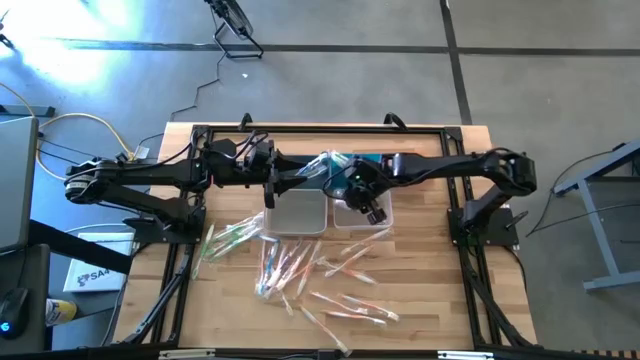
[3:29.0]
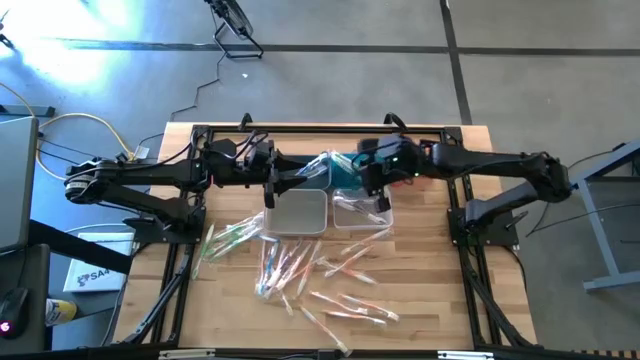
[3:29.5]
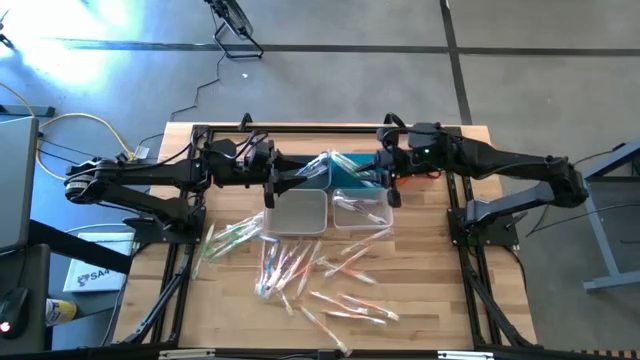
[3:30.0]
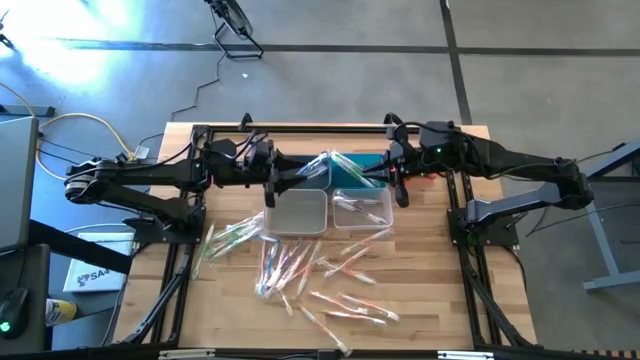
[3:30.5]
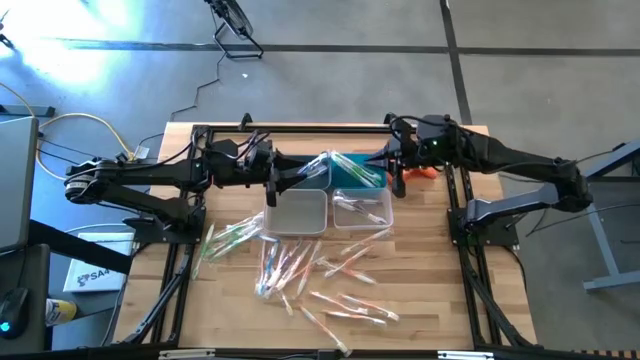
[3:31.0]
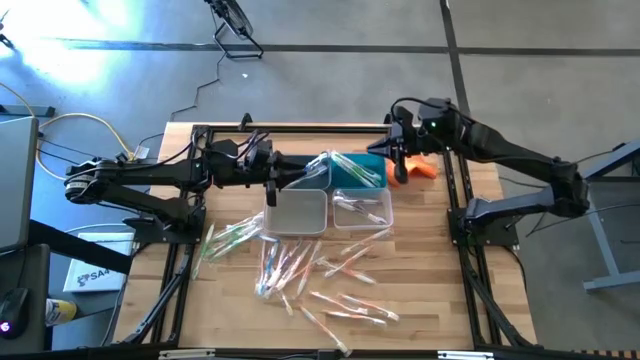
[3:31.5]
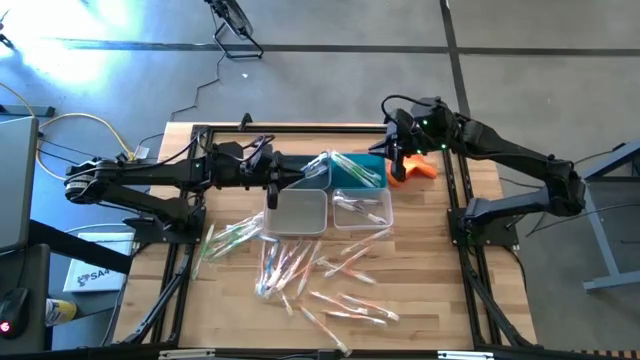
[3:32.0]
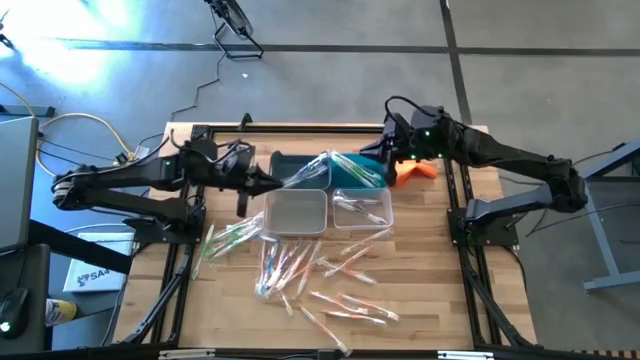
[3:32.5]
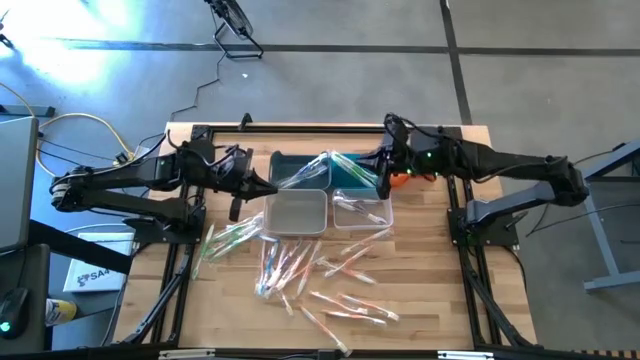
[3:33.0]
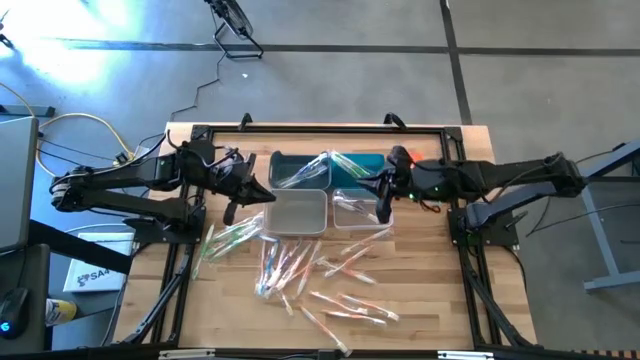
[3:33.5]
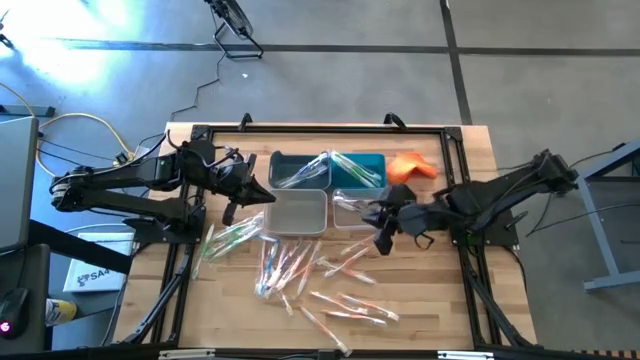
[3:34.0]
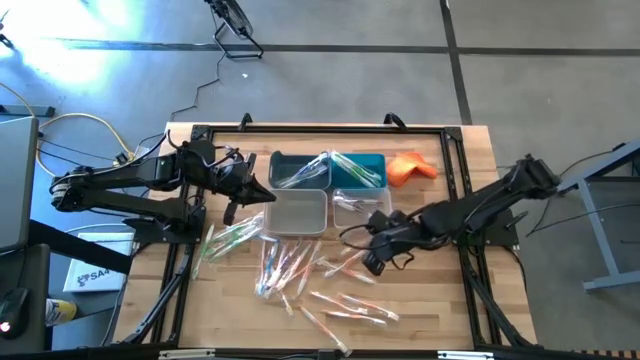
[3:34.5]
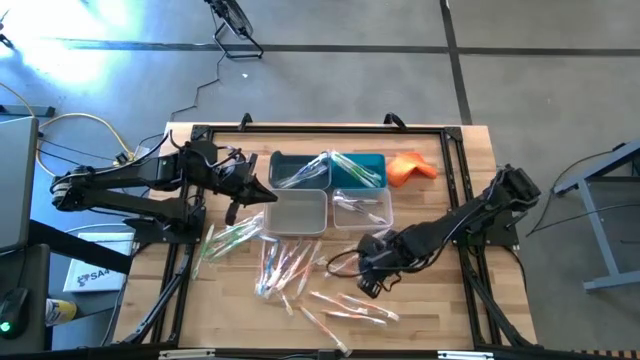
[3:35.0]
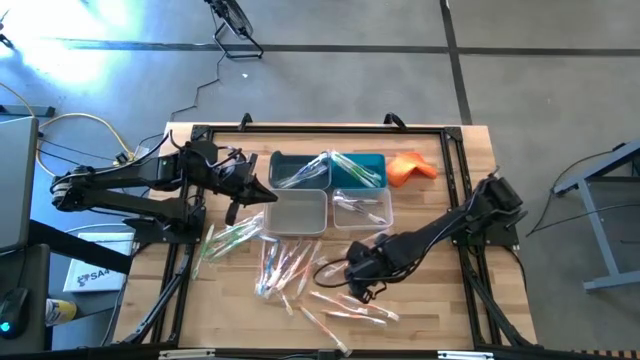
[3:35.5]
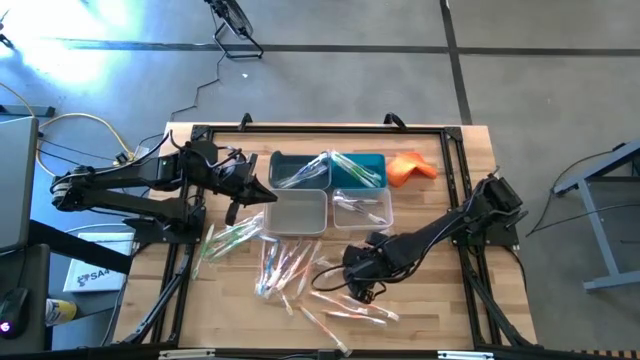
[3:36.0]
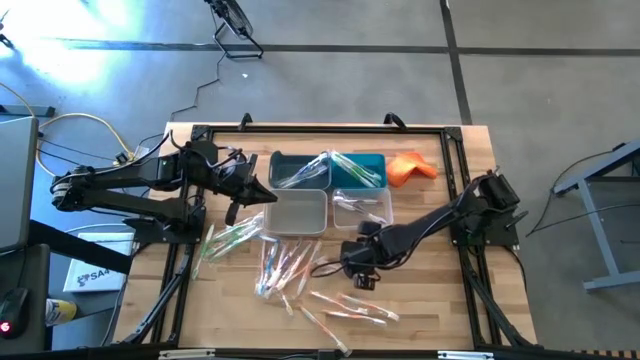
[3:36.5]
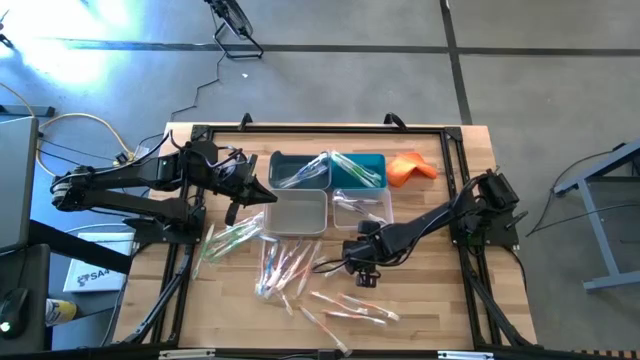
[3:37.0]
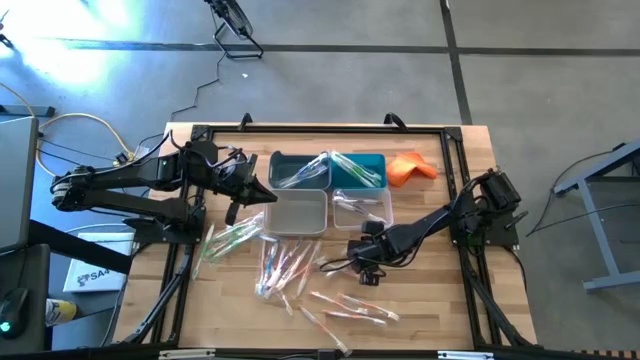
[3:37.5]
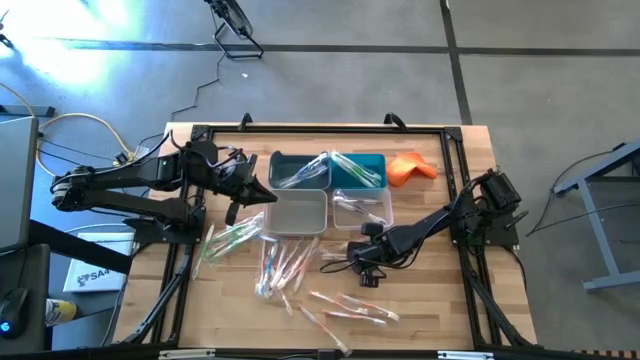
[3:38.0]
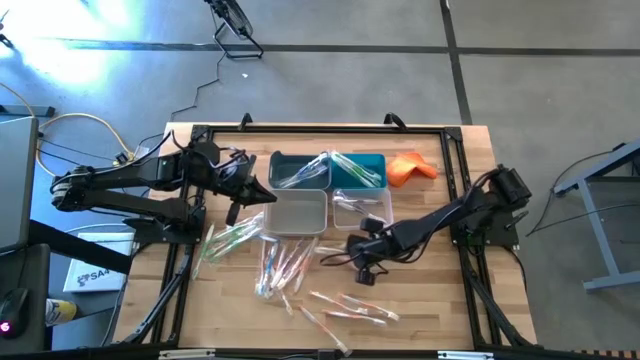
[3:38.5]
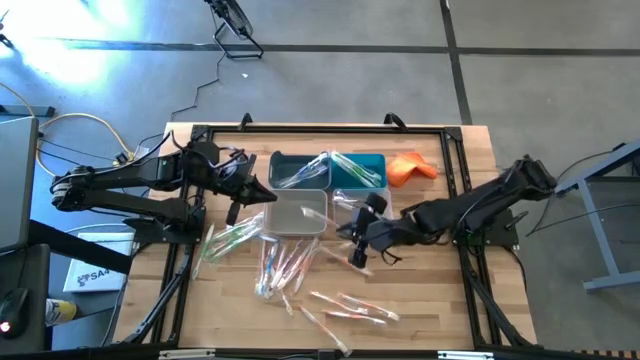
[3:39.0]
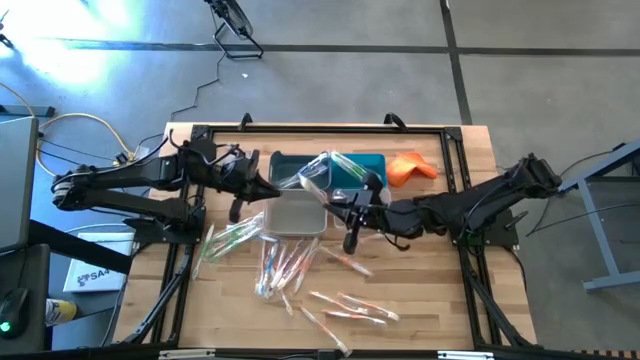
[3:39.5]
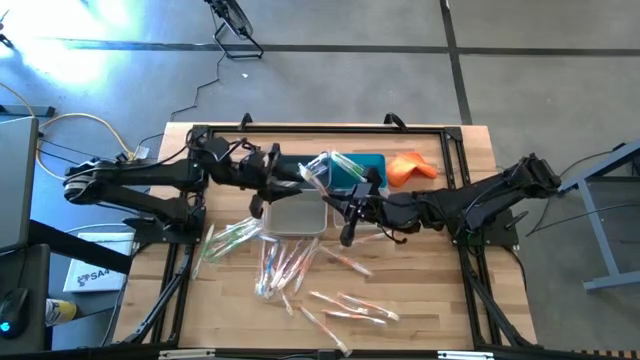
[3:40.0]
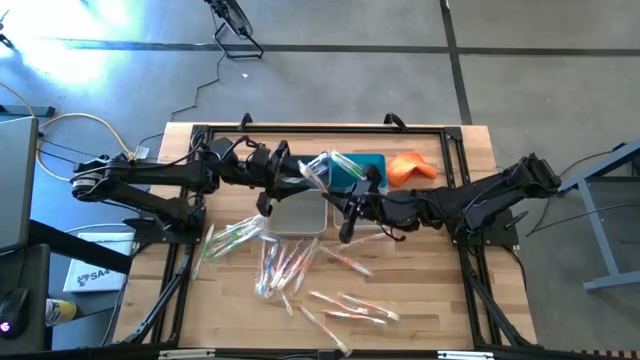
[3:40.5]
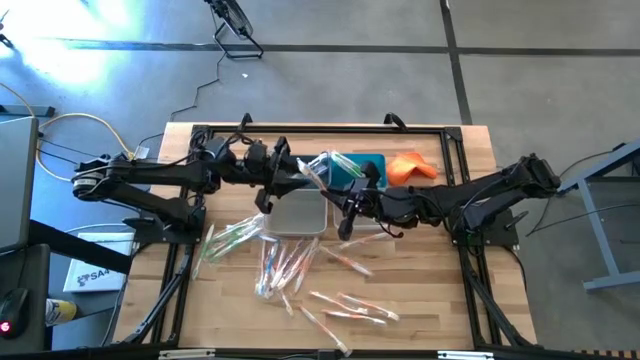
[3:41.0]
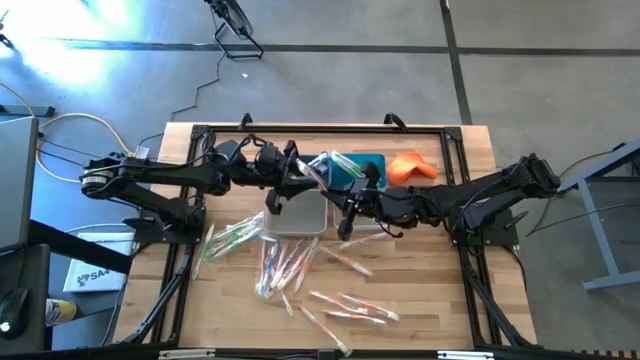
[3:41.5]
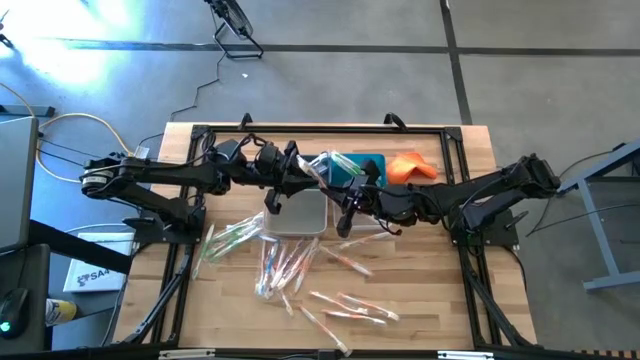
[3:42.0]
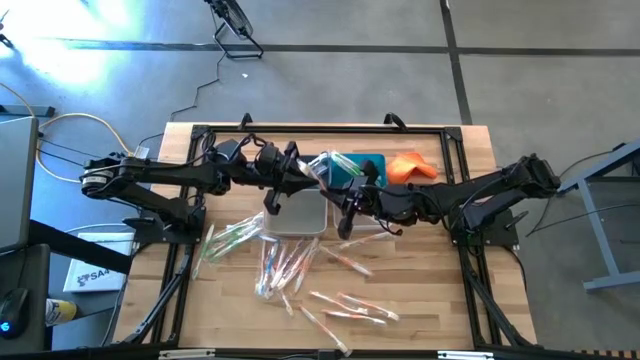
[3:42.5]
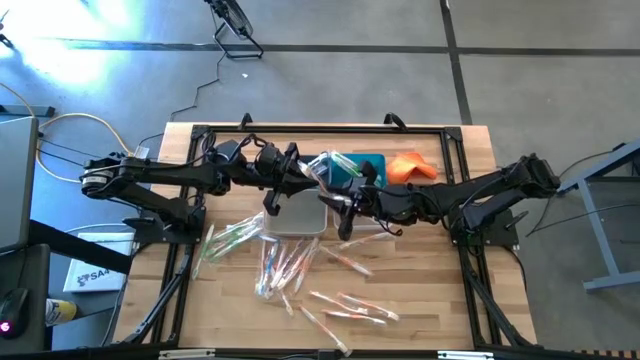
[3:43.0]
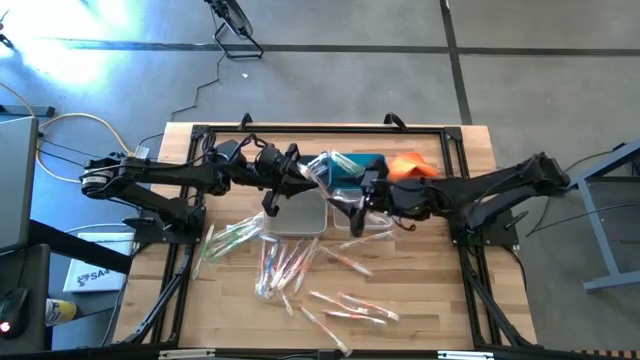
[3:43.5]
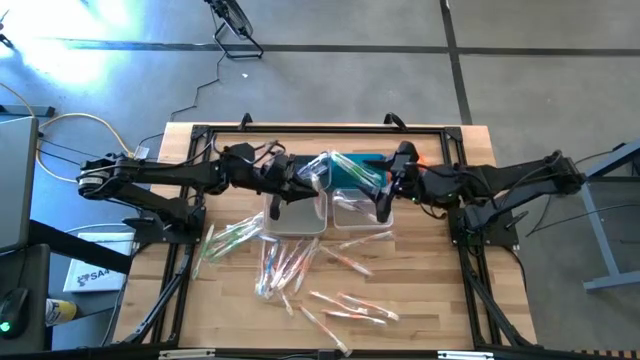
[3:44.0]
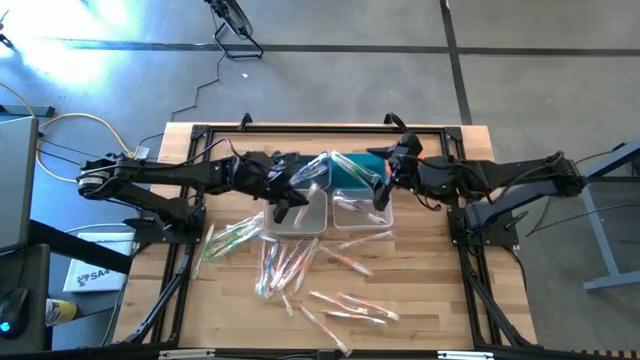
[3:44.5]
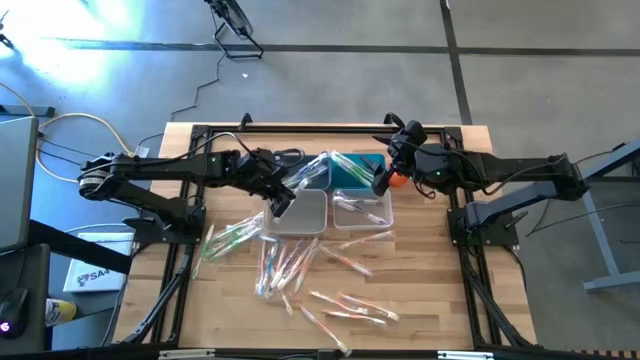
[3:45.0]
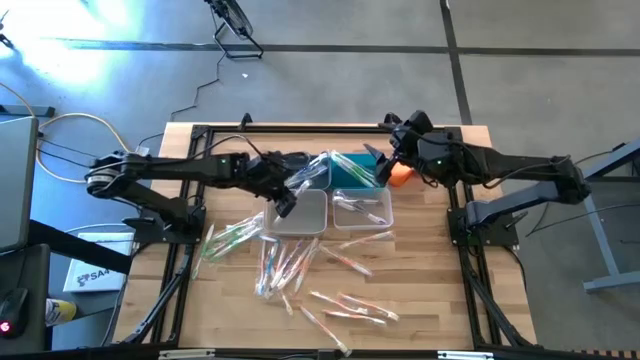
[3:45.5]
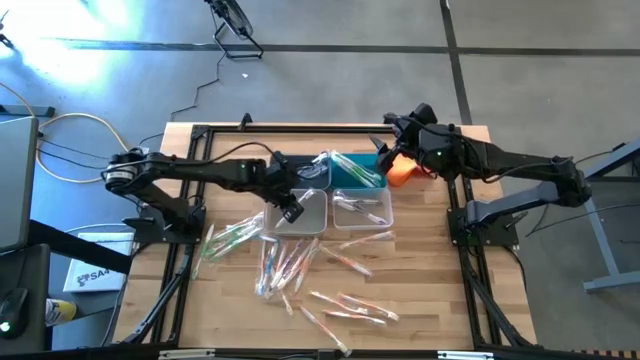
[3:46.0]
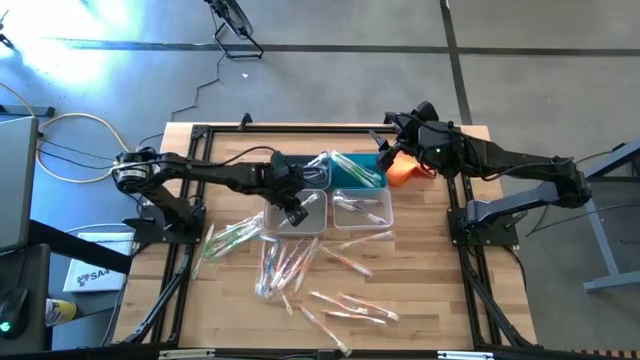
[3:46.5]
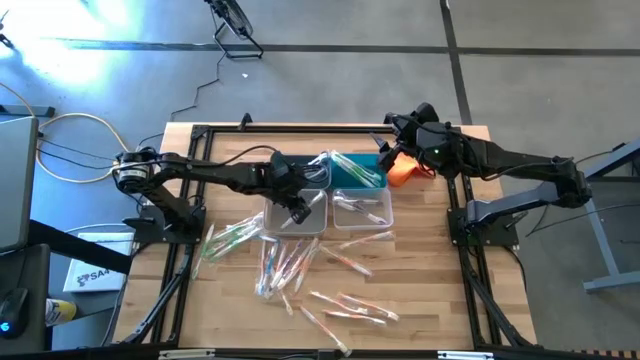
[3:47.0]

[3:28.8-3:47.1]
Task: Pick & Place Toothbrushes
Put the orange toothbrush into the gray bin

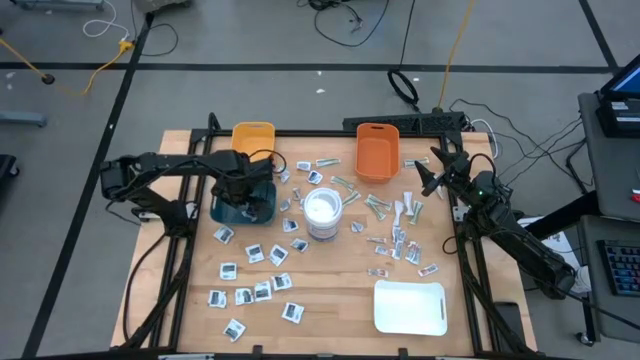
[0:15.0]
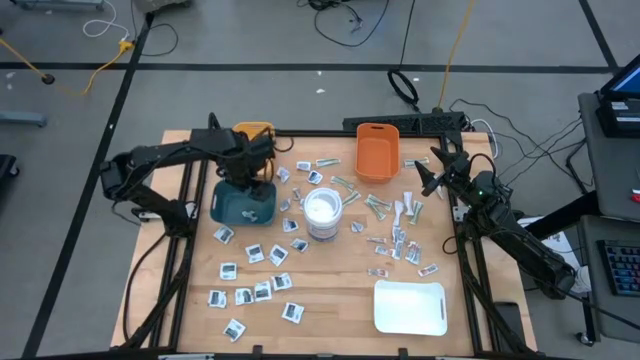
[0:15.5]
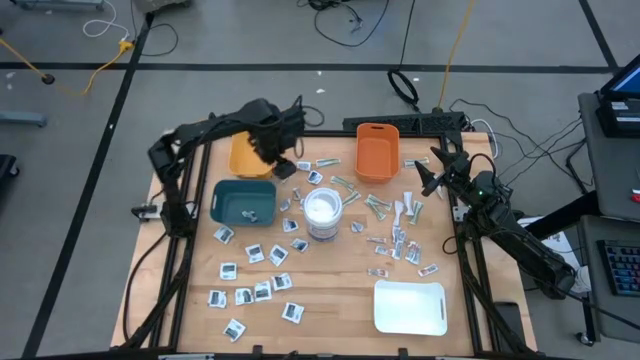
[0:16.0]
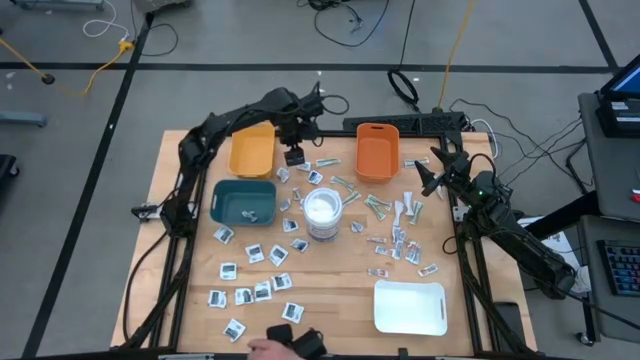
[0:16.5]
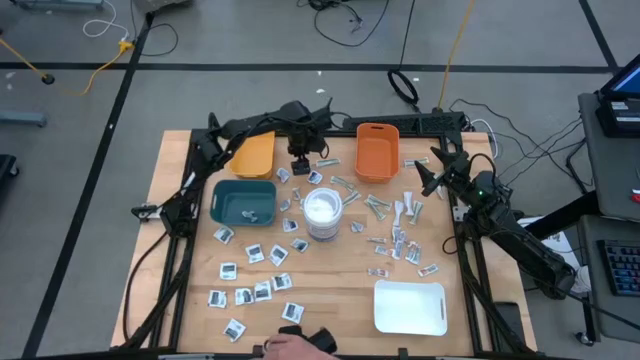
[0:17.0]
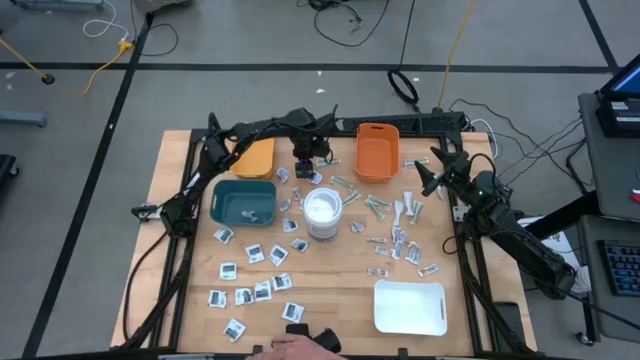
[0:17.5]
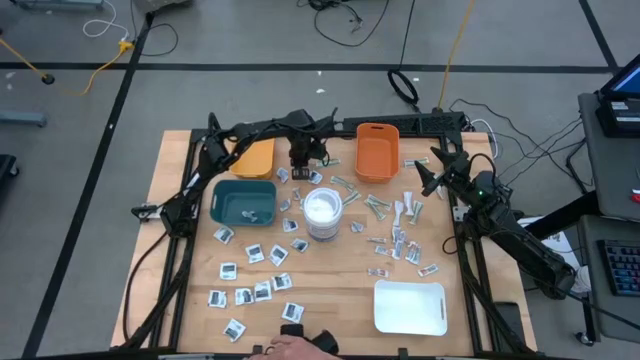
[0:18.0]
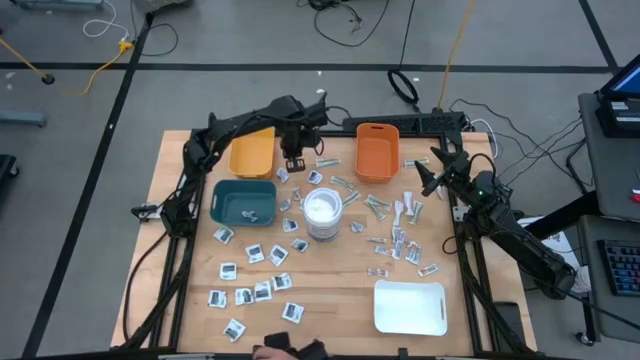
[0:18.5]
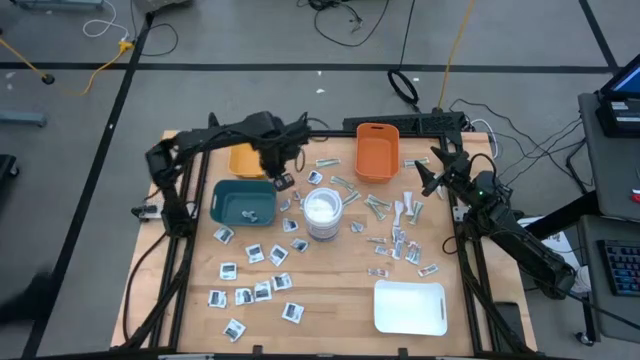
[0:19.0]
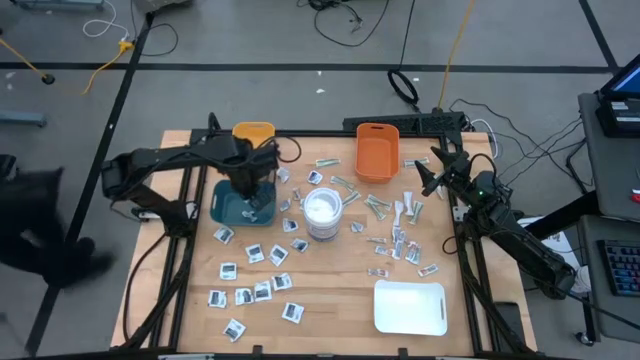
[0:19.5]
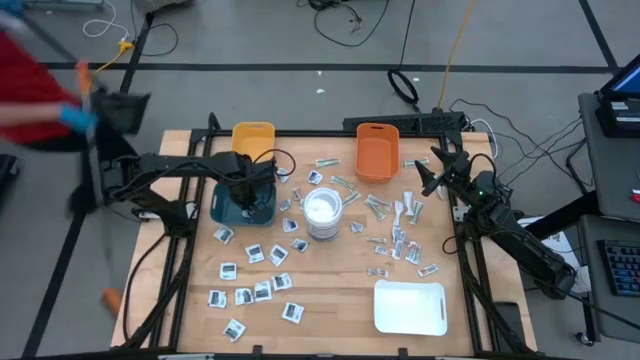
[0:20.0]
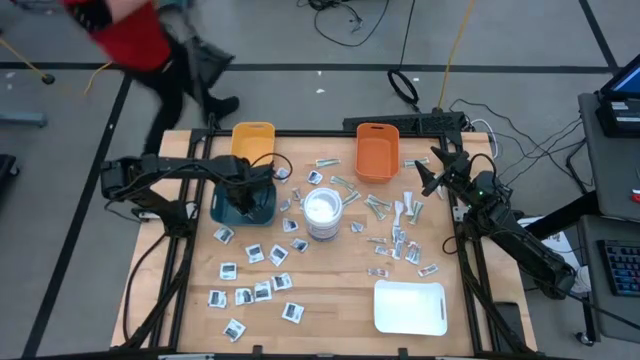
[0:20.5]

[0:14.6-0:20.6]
Task: Pick & Place First Aid Supplies
Put the blue pad into the blue bin
